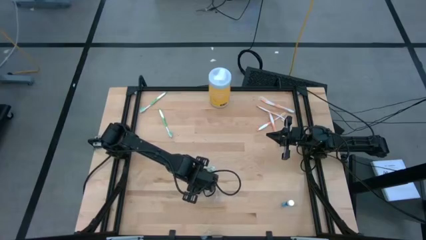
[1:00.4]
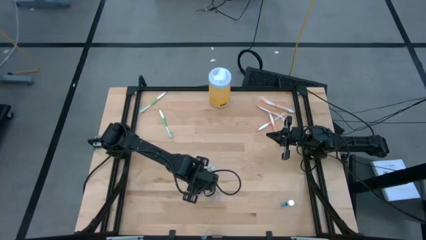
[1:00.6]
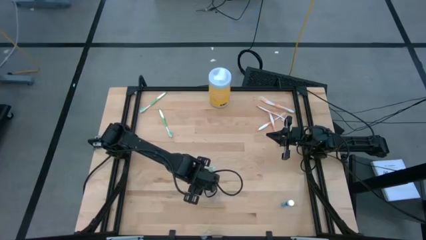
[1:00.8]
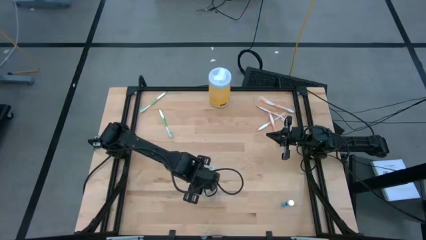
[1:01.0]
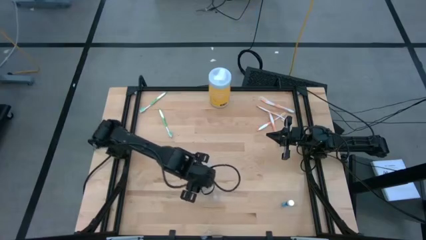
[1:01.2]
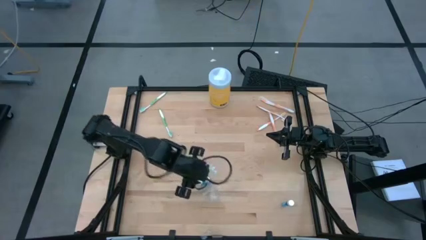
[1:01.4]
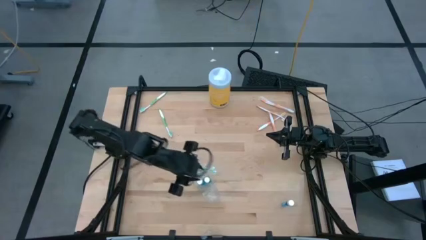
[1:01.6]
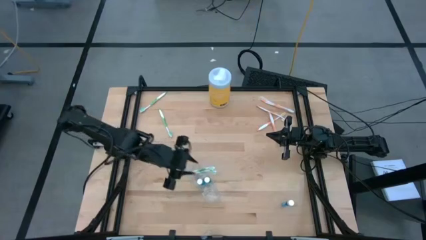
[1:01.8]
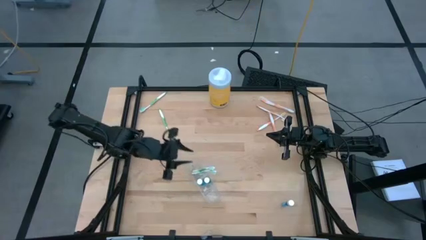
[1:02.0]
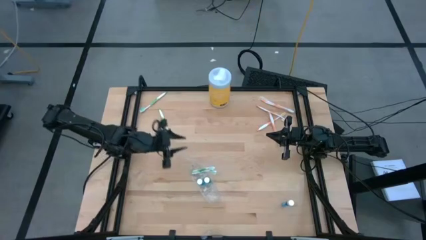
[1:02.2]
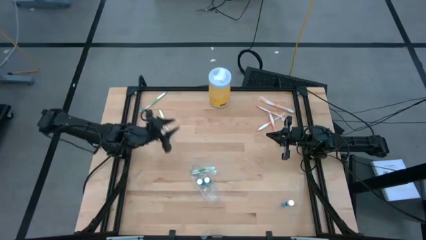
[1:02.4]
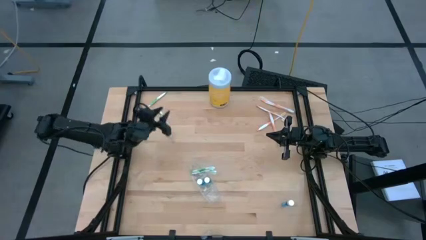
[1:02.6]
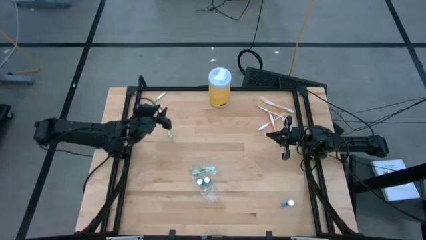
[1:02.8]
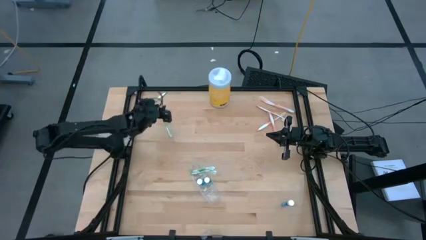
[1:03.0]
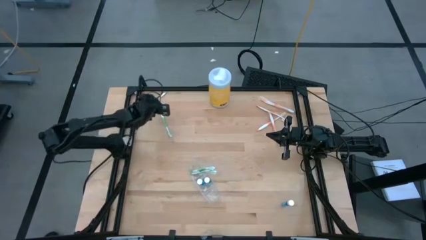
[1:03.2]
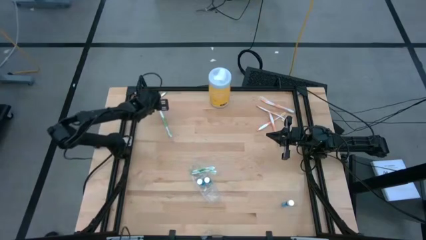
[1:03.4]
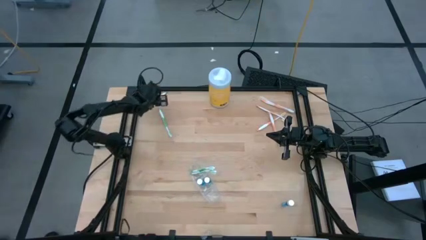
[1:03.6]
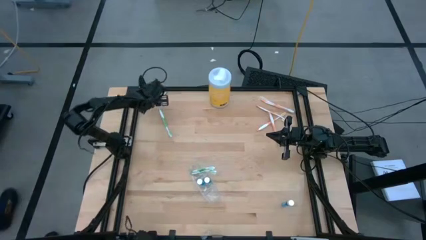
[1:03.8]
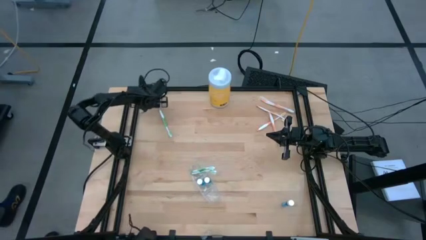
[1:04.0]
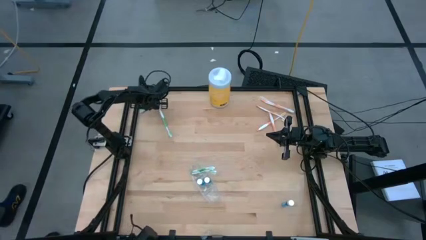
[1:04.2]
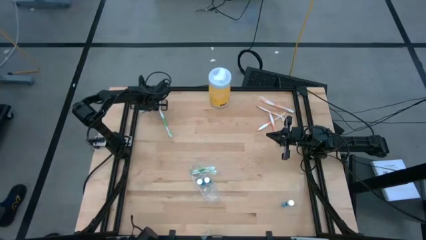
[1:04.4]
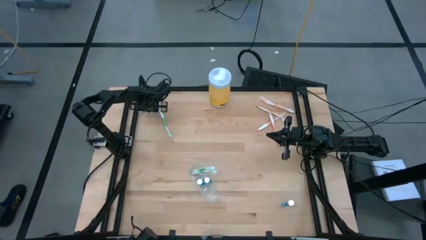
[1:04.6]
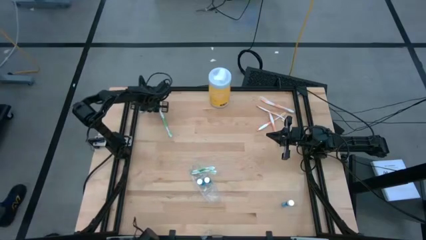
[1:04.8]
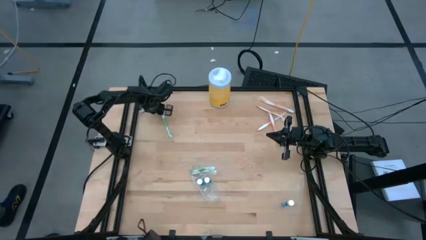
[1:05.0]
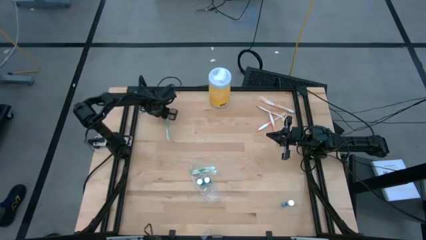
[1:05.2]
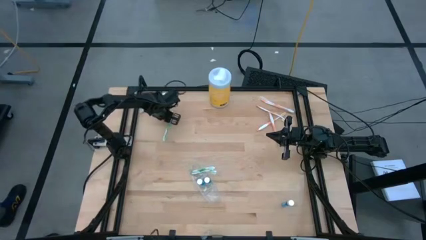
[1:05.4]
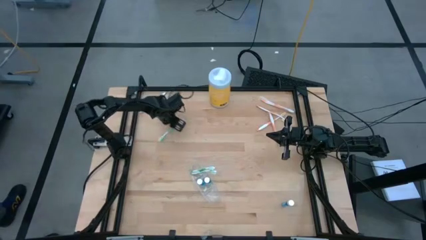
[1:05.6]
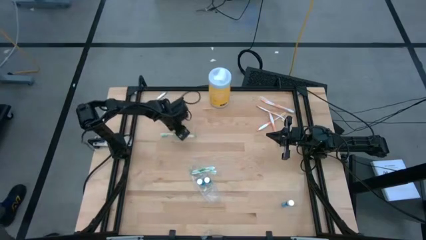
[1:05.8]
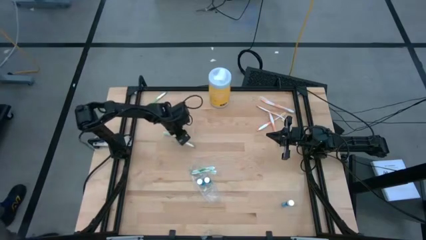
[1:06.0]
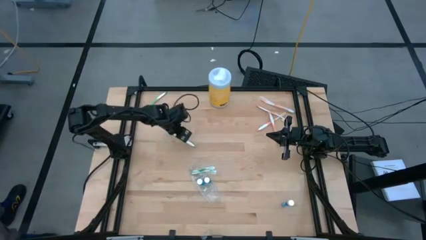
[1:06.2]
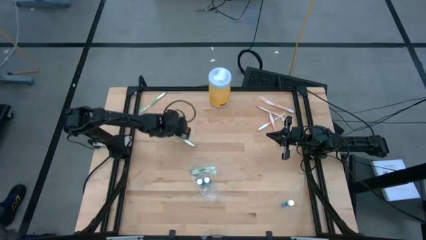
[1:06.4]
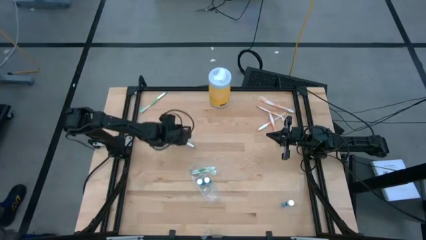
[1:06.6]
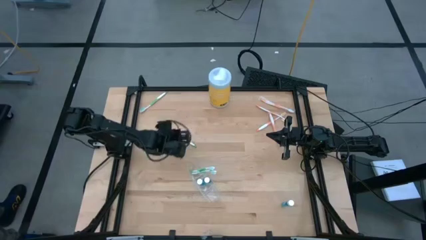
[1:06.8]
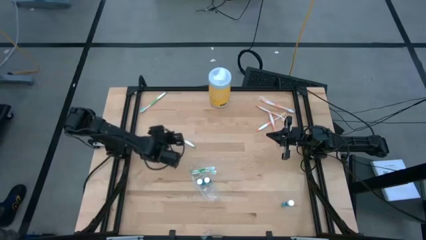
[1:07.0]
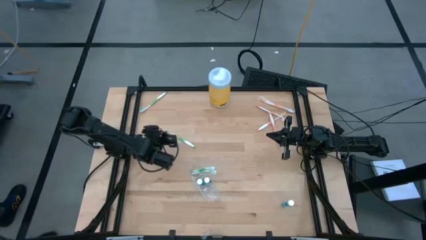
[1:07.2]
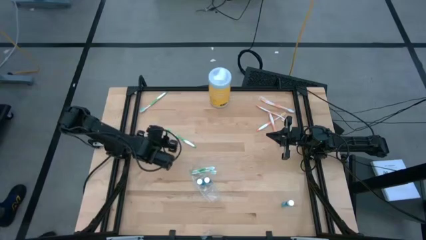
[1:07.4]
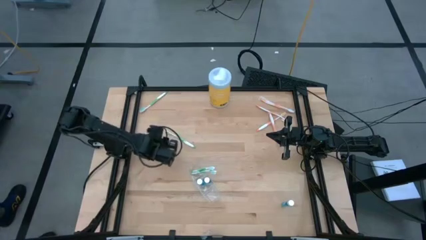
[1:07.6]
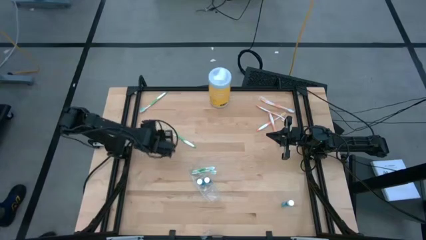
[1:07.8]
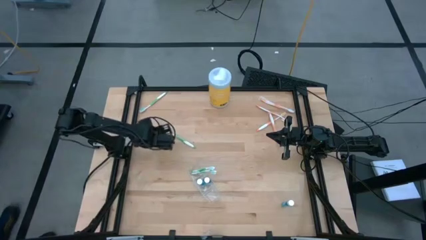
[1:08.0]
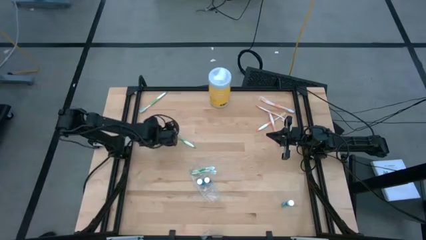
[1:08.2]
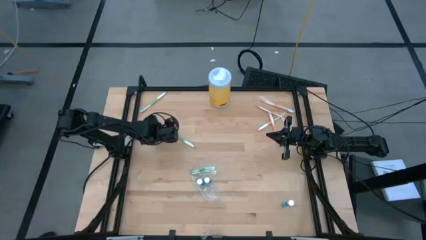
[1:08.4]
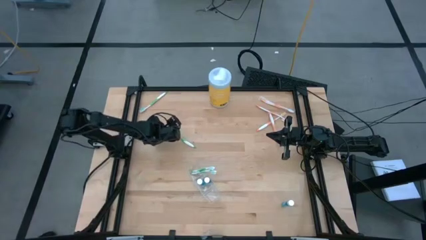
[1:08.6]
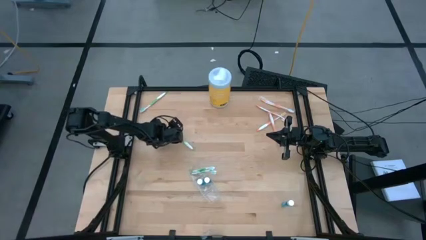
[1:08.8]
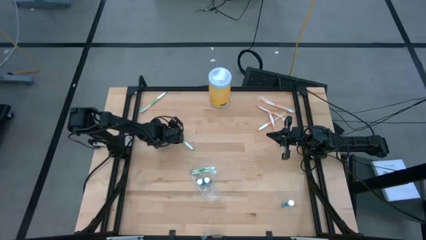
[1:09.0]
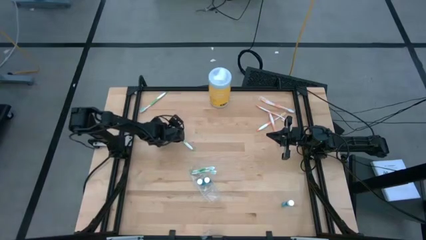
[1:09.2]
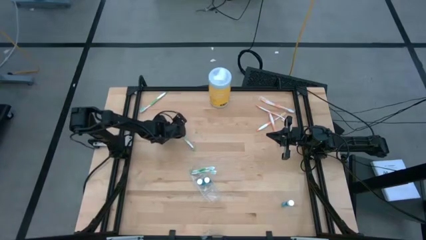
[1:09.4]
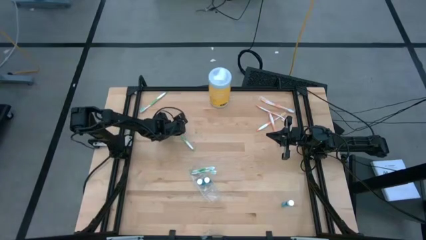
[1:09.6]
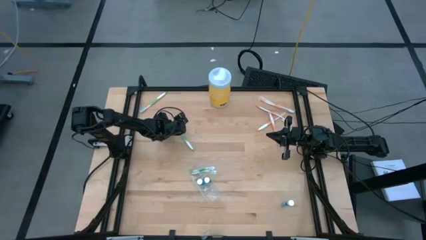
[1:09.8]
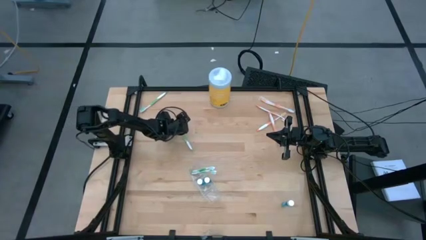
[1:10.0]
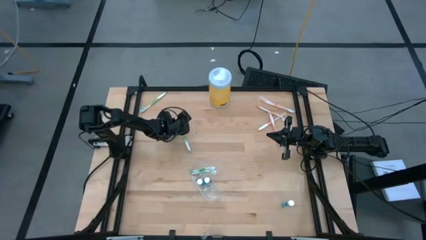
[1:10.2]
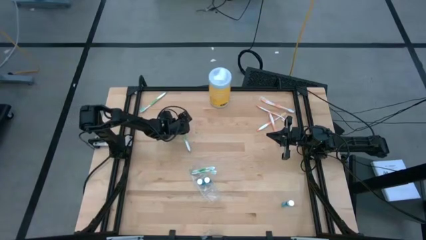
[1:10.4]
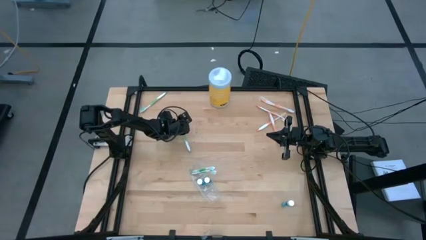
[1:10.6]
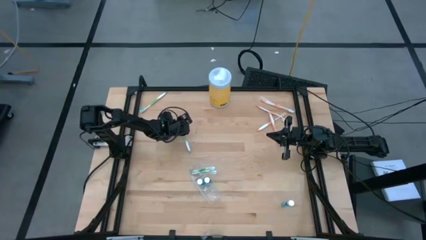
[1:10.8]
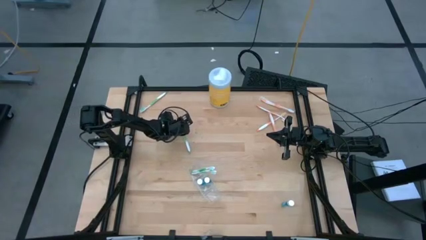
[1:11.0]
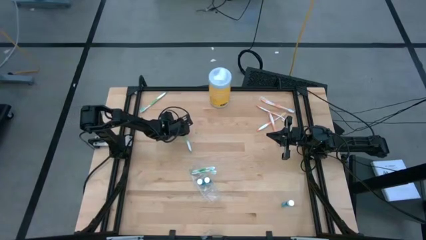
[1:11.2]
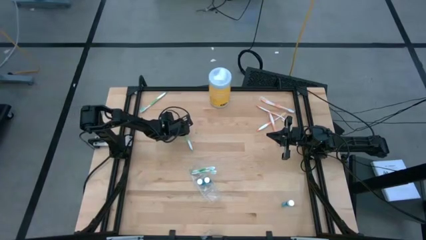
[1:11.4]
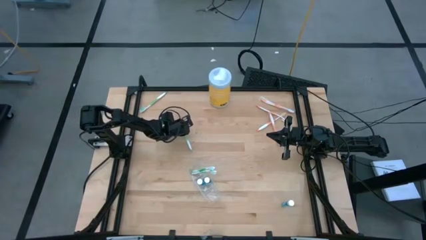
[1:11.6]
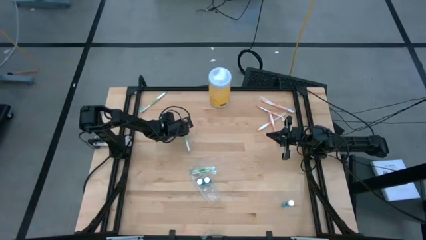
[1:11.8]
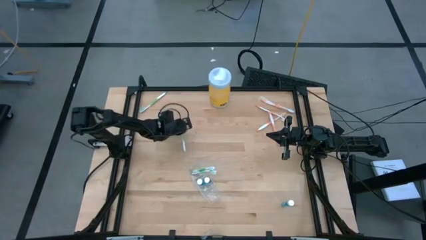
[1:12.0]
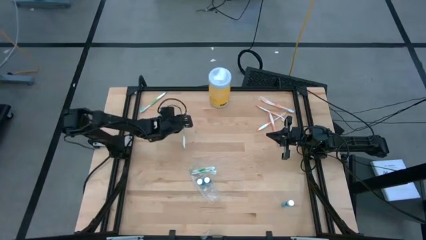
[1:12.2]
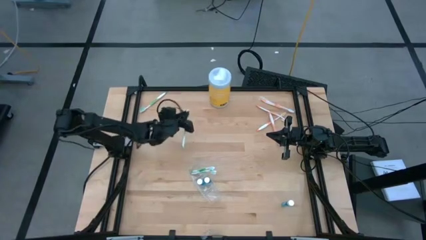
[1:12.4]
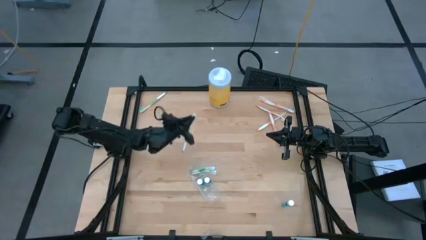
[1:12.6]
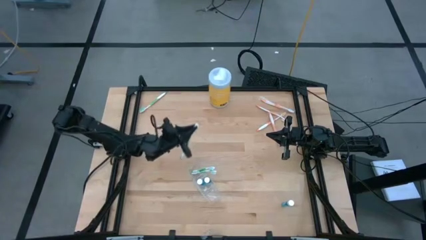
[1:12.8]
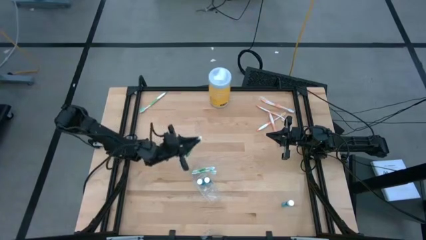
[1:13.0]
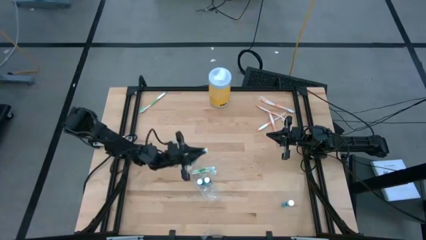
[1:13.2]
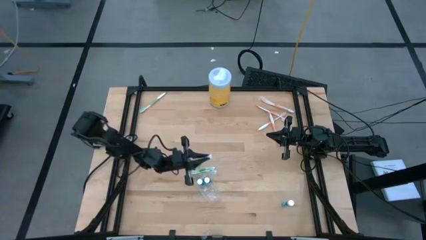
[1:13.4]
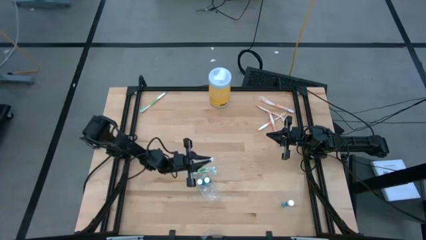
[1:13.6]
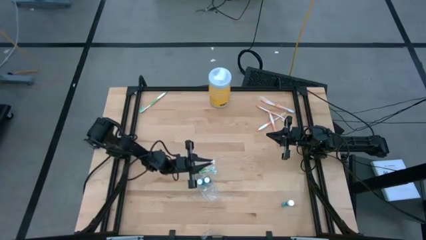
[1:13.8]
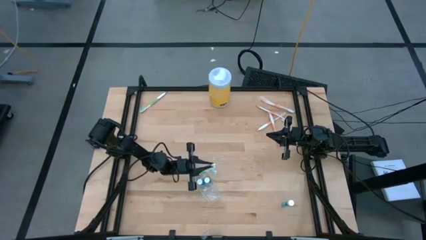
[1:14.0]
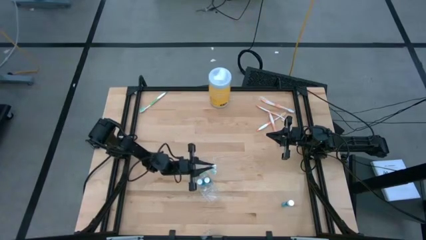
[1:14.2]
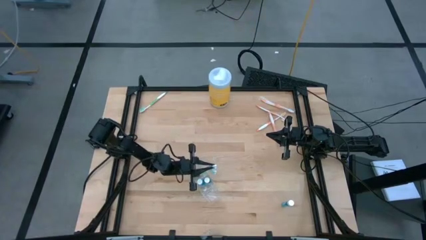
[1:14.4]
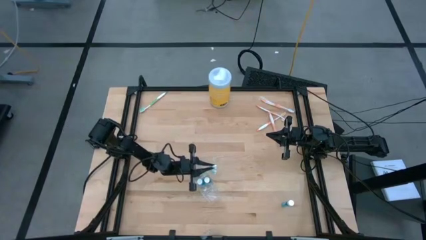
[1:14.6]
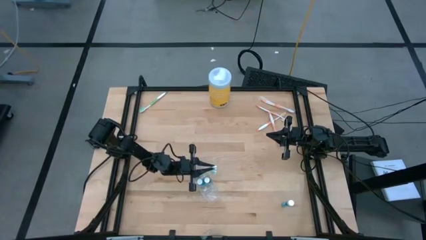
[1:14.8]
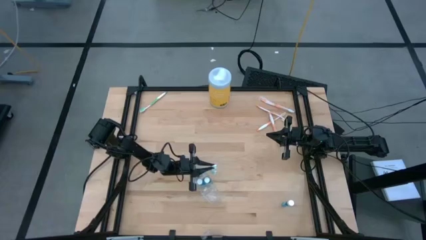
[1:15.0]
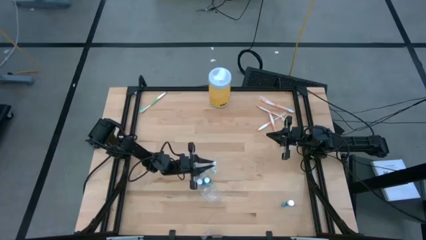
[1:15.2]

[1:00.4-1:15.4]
Task: Pick & Place toothbrushing station
Put the green toothbrush into the transparent organizer
